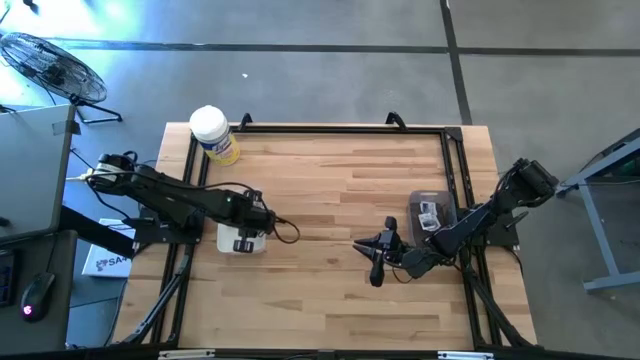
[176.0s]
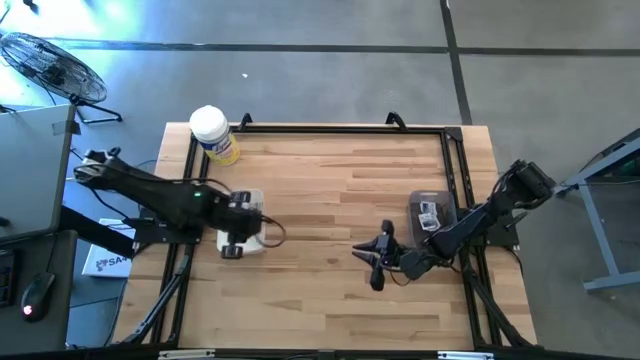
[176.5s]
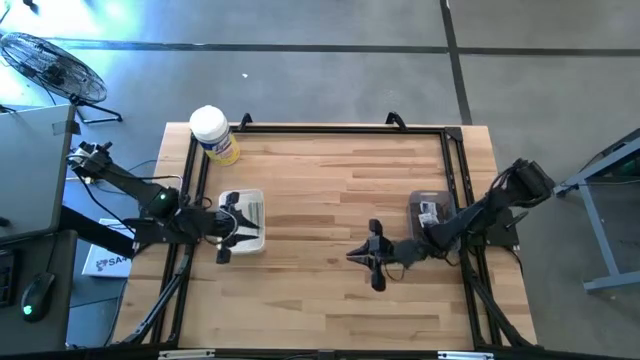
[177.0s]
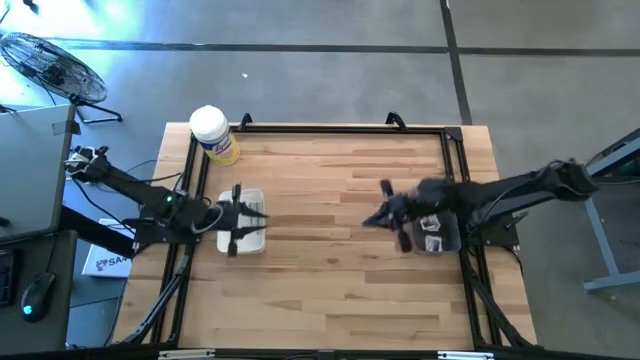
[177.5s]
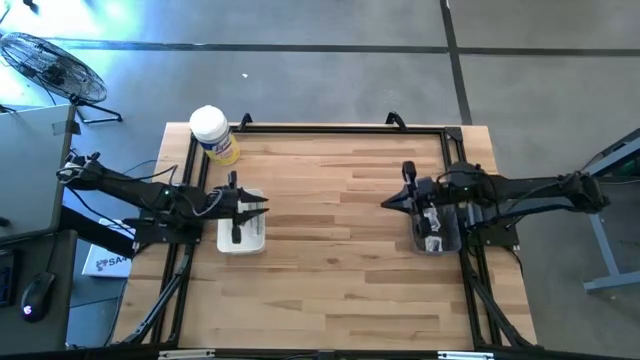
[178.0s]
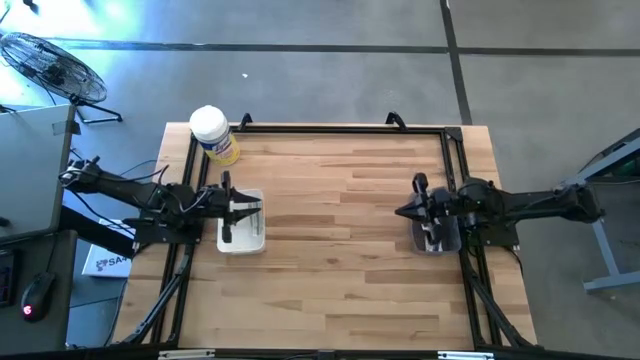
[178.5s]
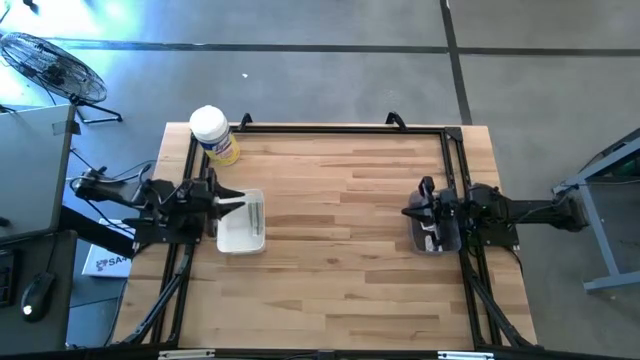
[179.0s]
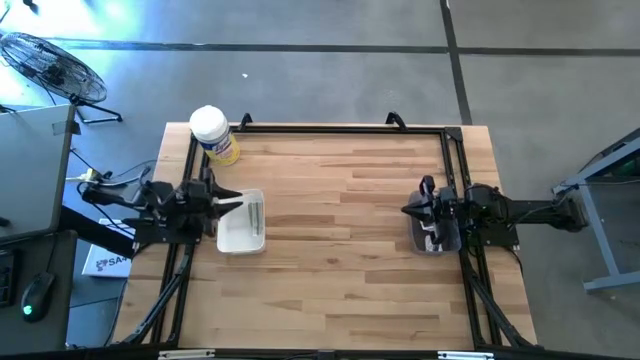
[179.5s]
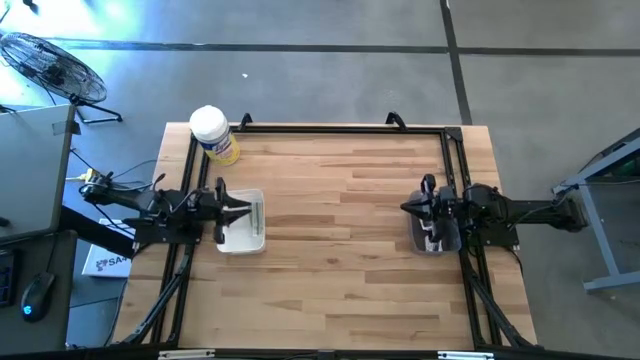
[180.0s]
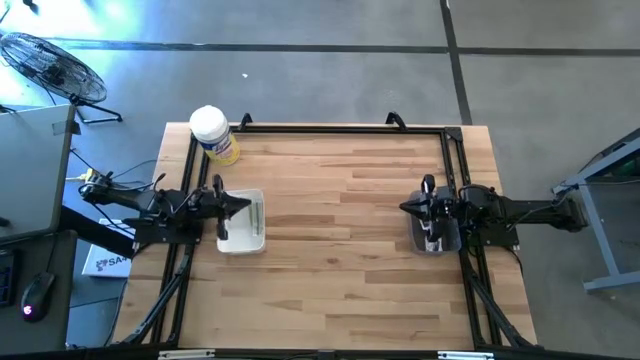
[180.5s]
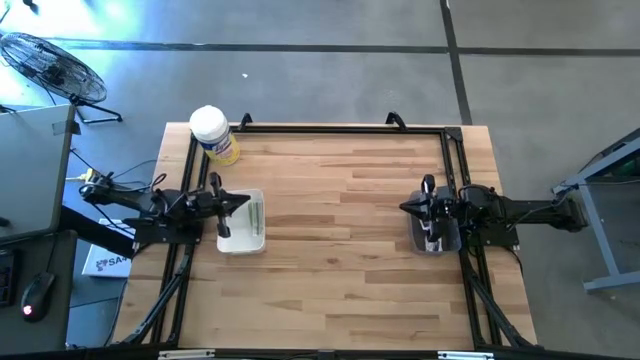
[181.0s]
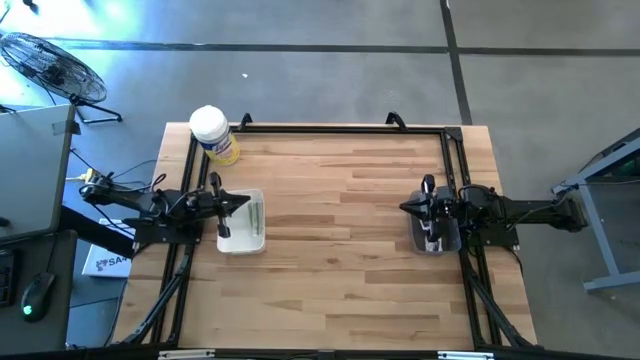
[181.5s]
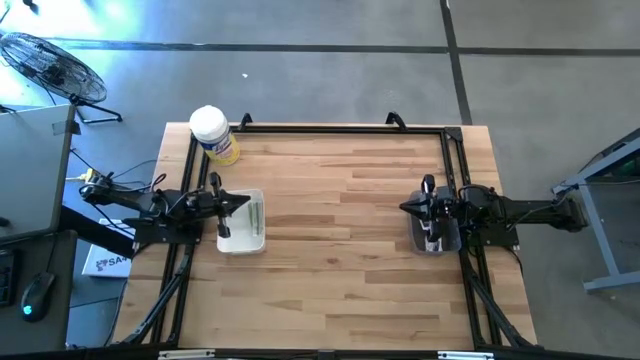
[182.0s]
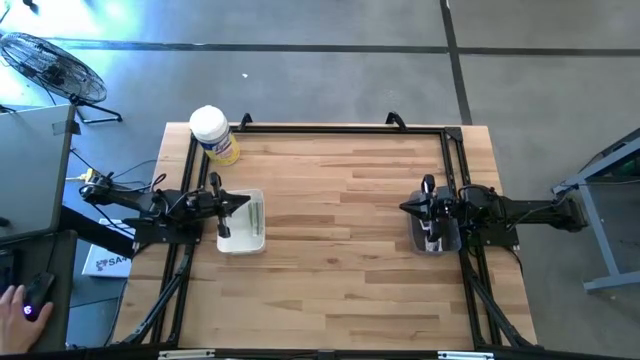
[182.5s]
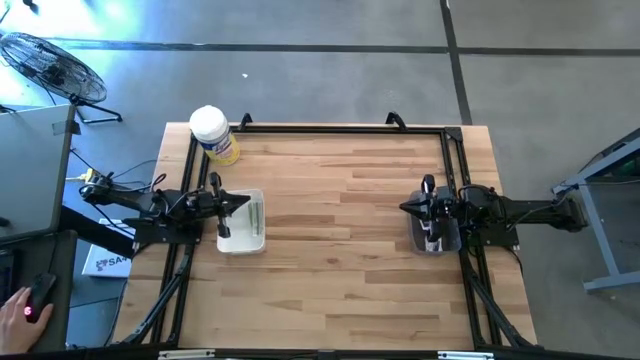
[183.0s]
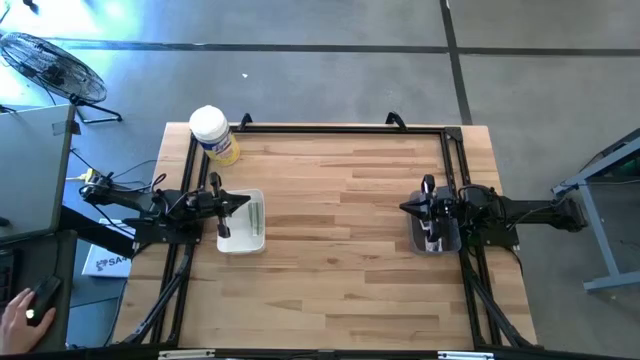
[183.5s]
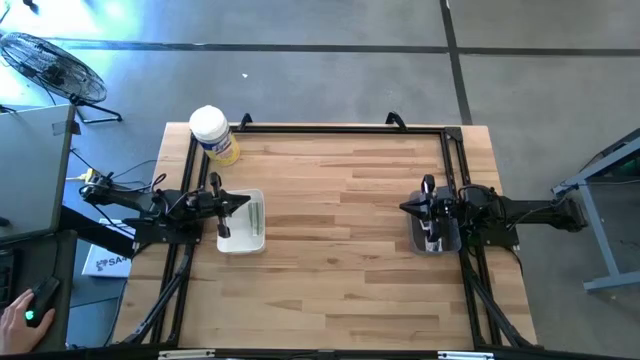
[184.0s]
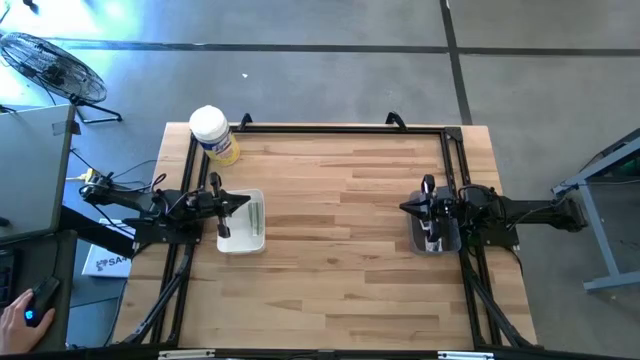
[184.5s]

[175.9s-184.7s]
Task: Pick & Place First Aid Supplies
Return to Home Position

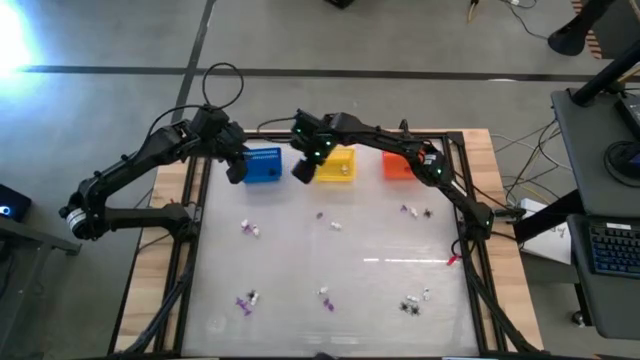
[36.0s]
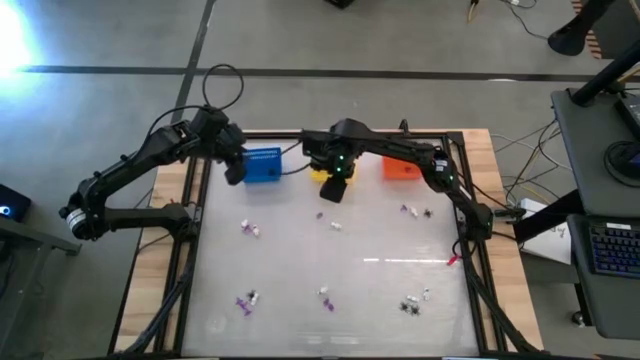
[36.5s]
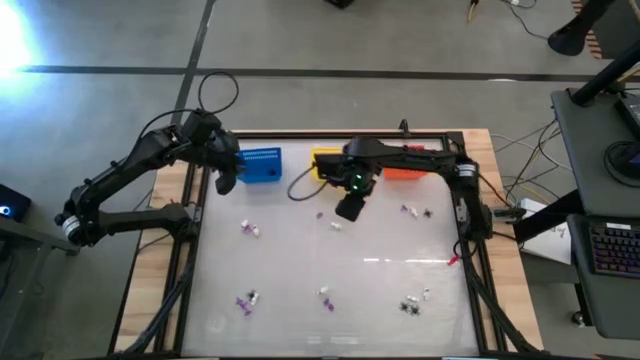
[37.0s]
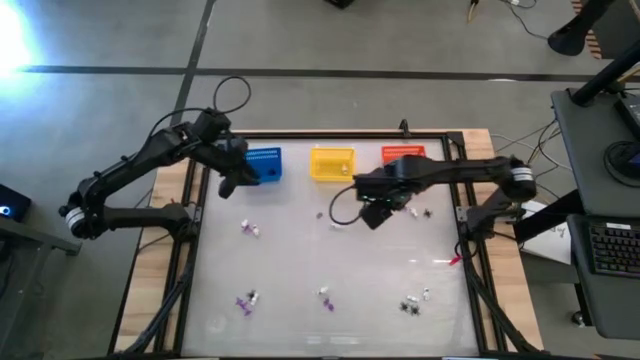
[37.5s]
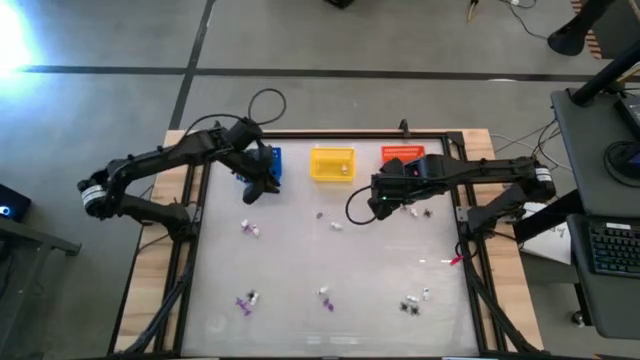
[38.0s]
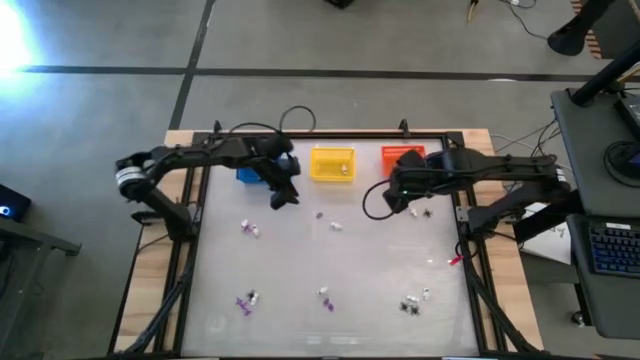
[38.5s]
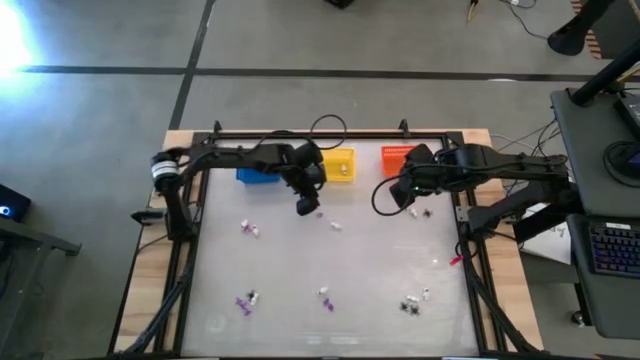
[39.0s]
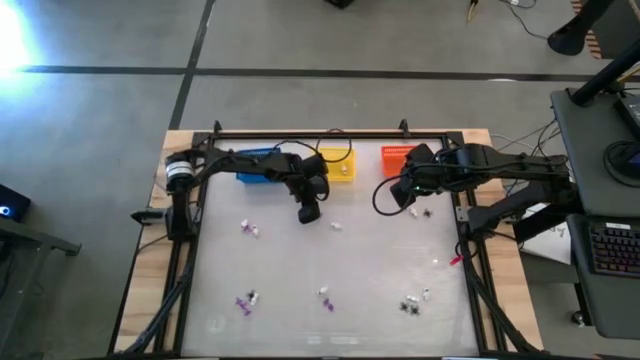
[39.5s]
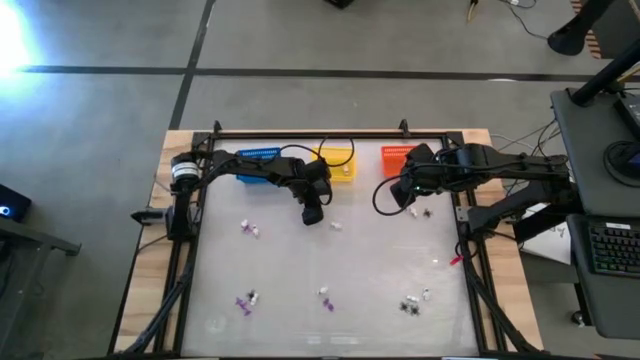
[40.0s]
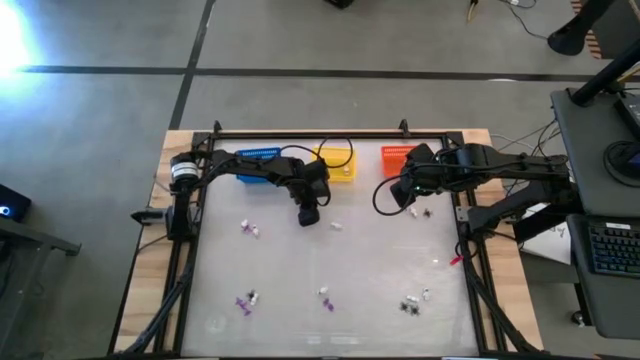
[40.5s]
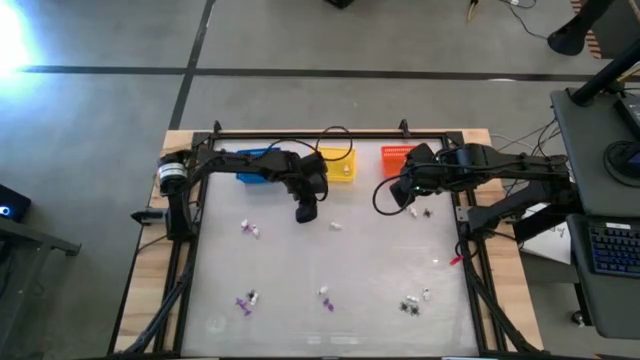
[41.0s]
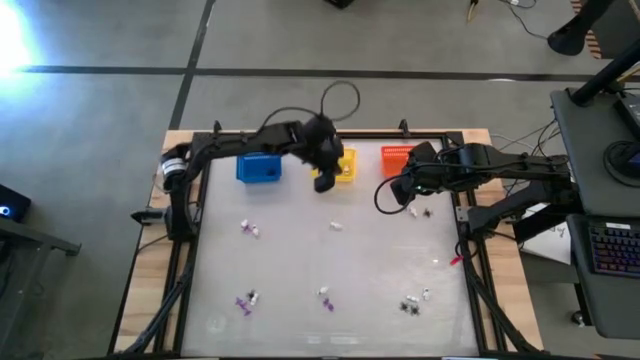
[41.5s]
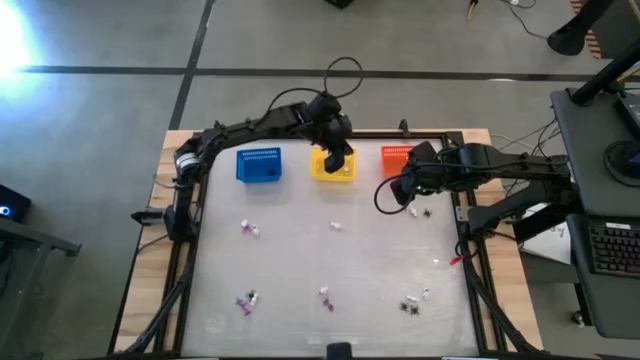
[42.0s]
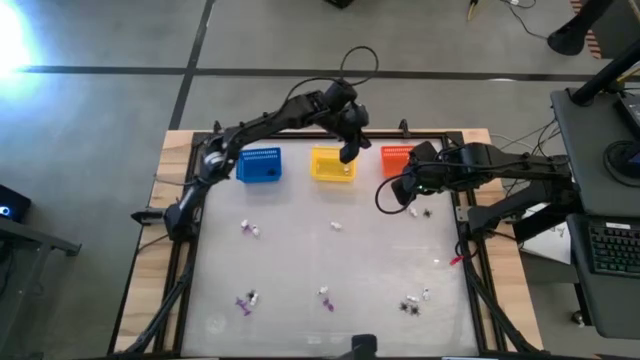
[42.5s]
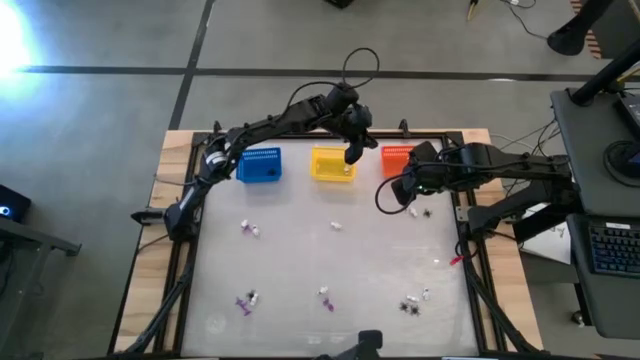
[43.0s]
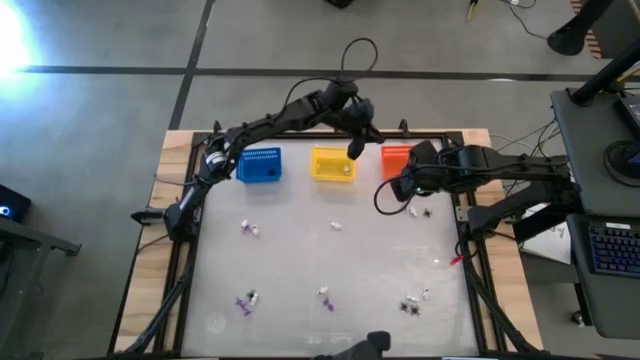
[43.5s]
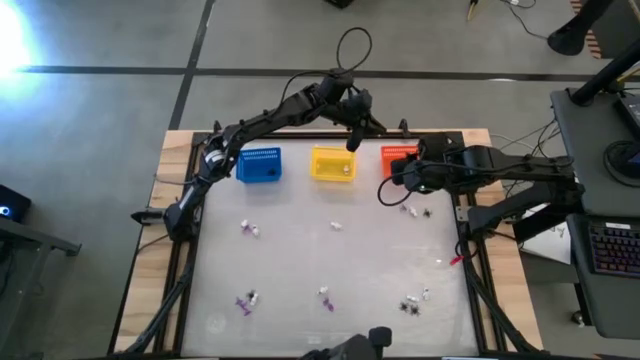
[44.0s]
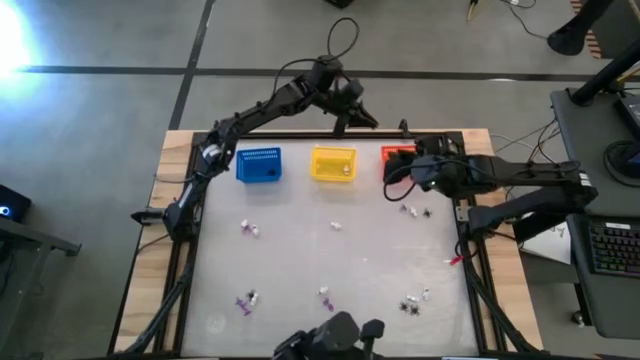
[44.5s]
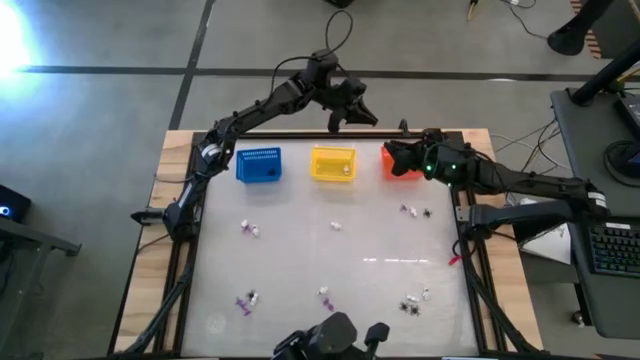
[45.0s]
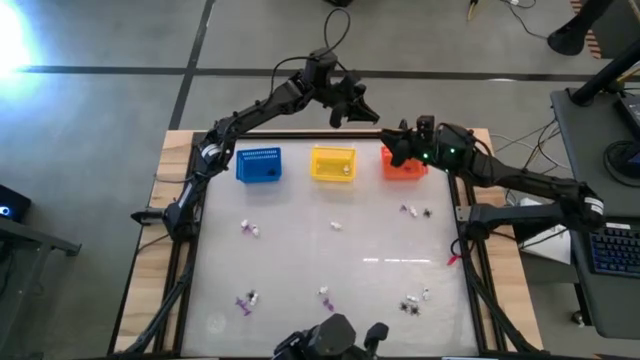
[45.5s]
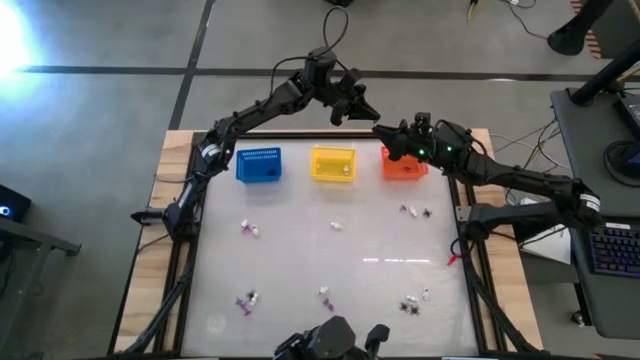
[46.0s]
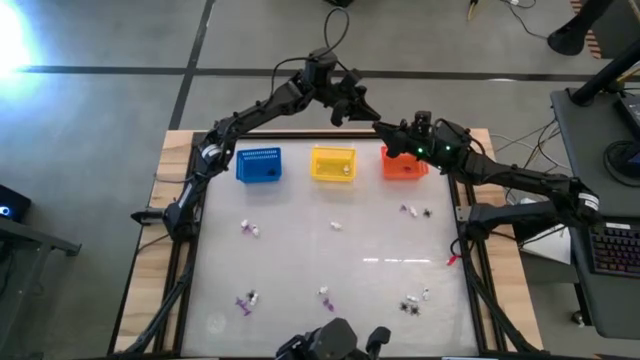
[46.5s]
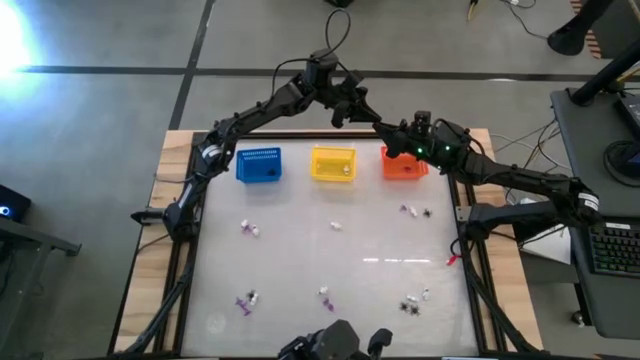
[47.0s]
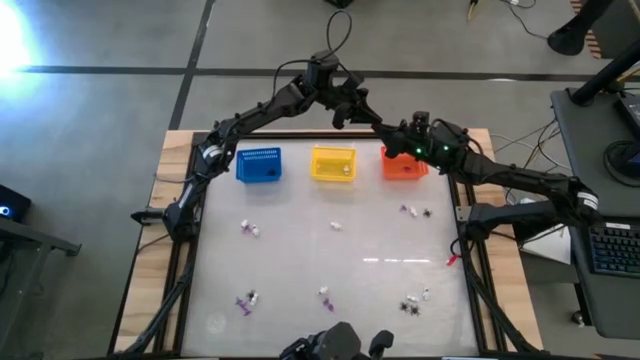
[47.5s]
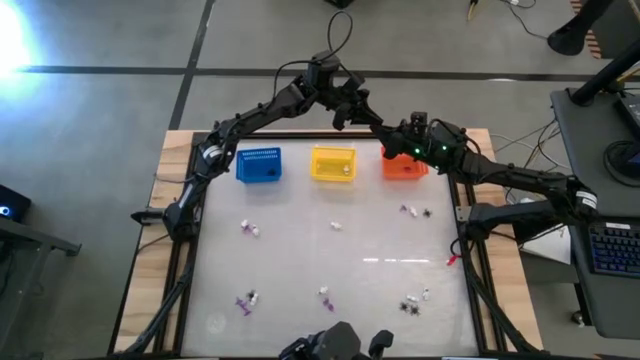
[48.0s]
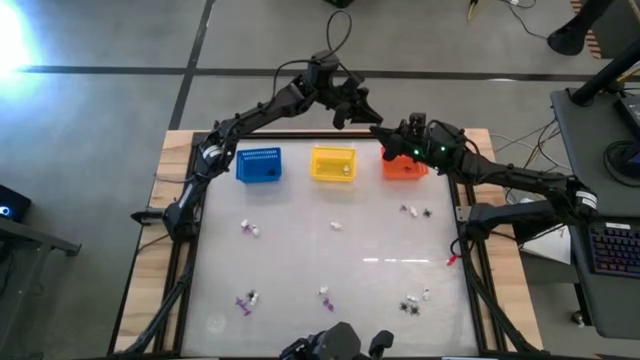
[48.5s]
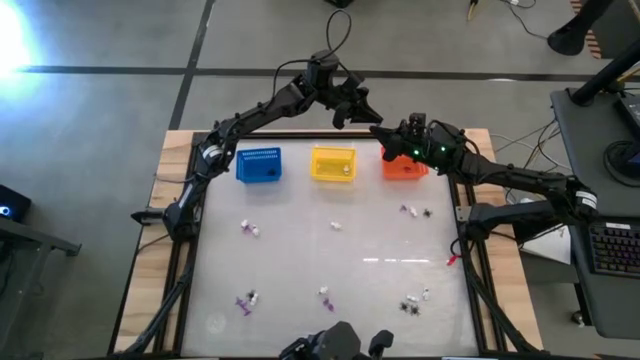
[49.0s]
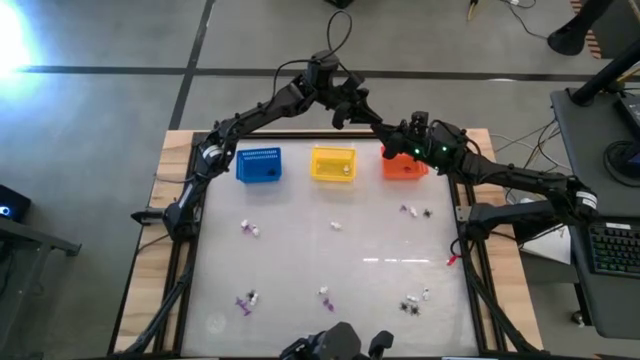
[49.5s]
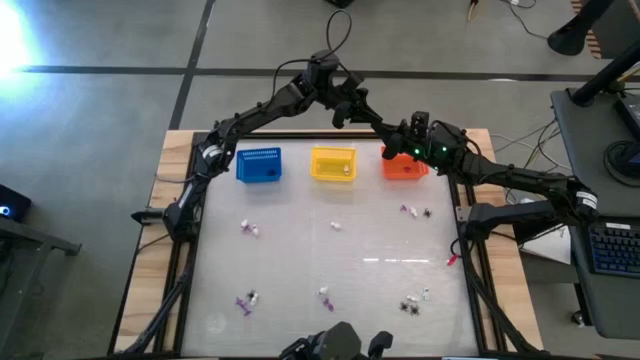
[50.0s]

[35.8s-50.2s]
Task: Sort Halloween decoration
Put the purple hat toy into the orange bin
